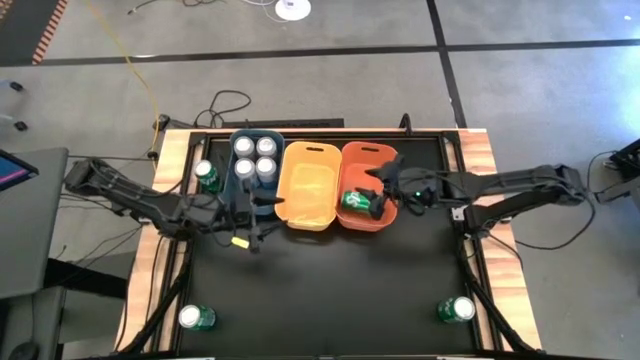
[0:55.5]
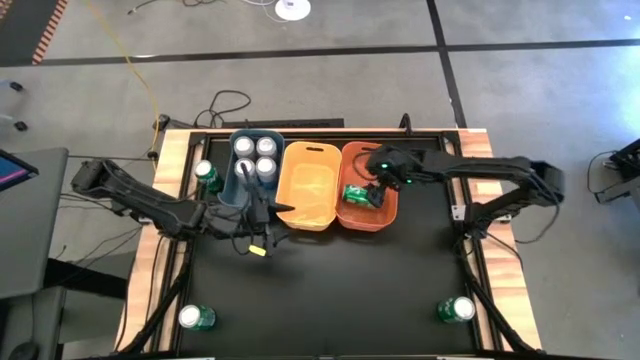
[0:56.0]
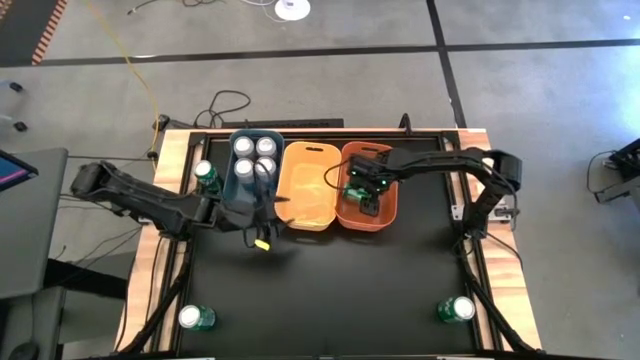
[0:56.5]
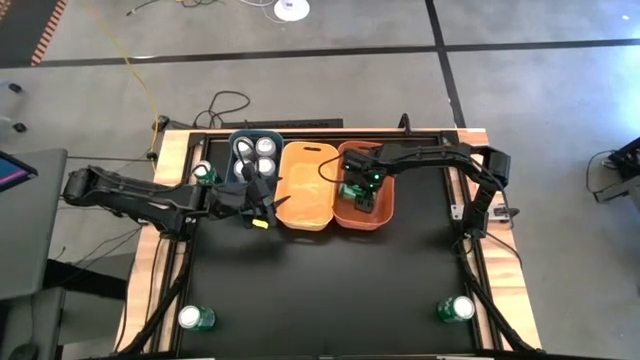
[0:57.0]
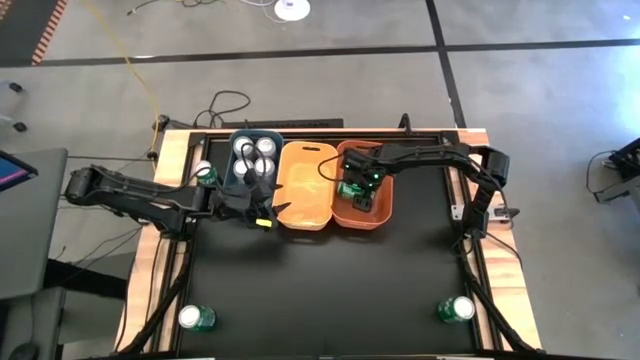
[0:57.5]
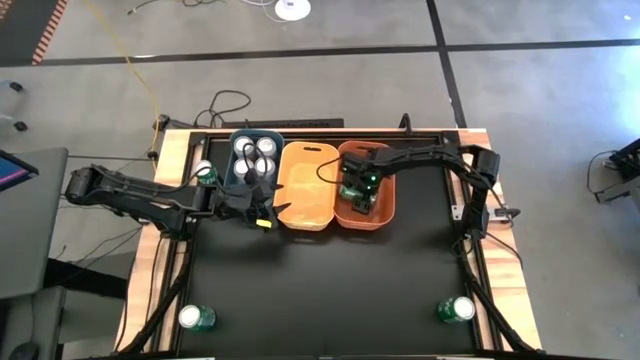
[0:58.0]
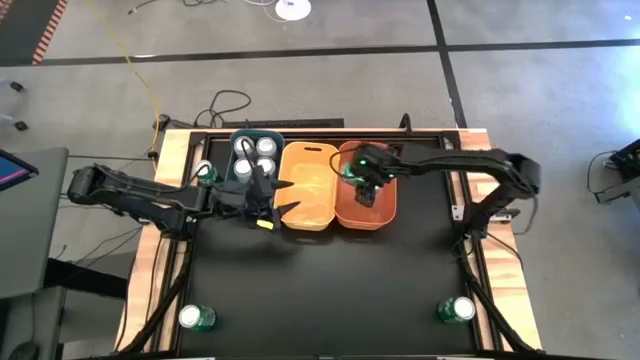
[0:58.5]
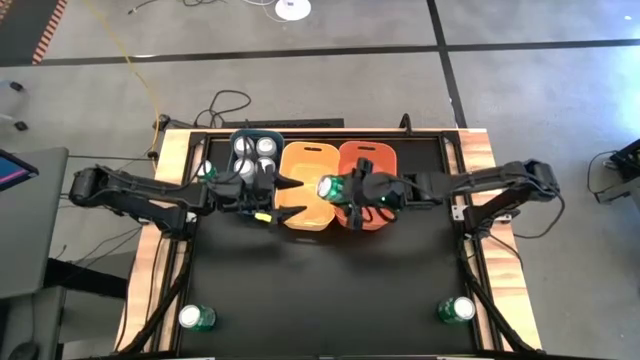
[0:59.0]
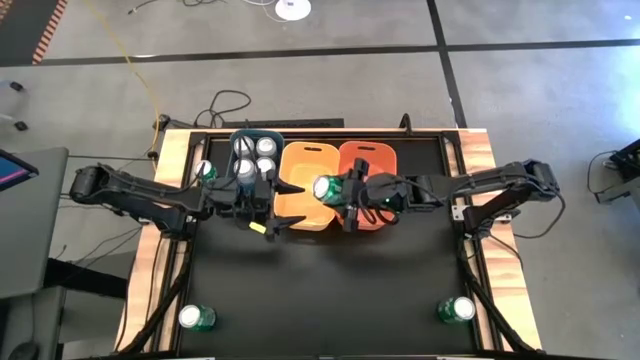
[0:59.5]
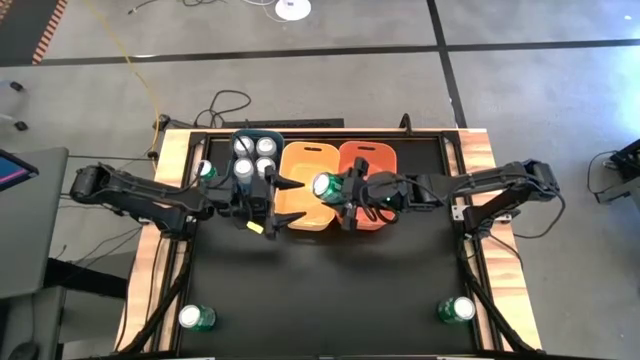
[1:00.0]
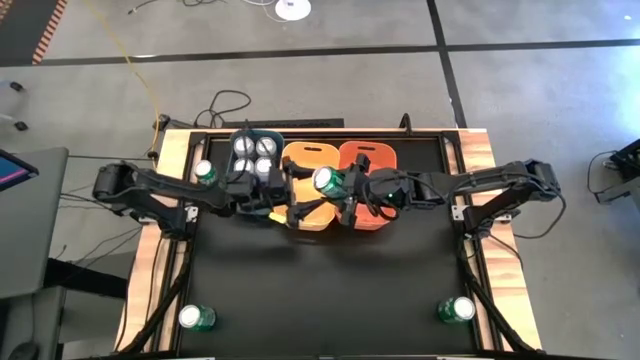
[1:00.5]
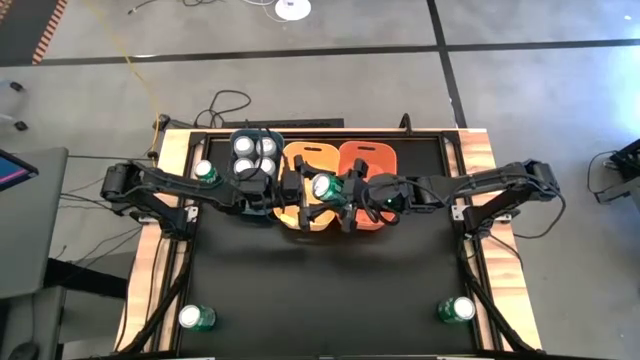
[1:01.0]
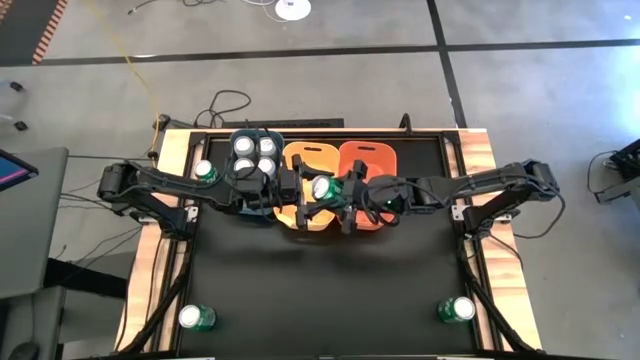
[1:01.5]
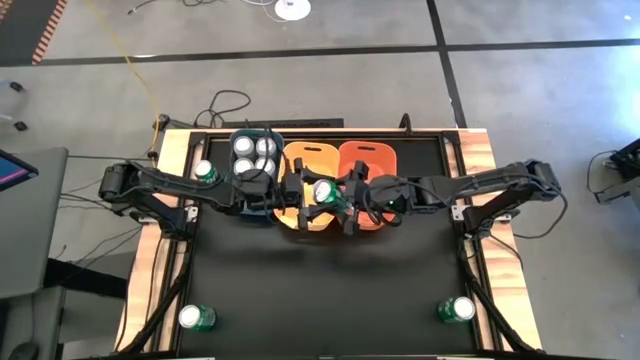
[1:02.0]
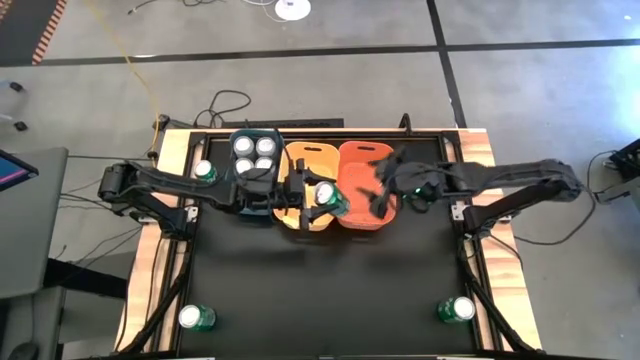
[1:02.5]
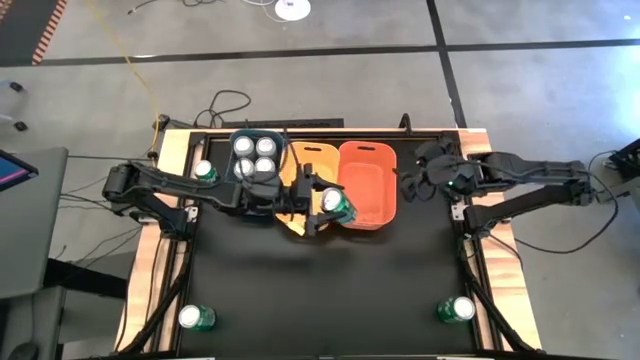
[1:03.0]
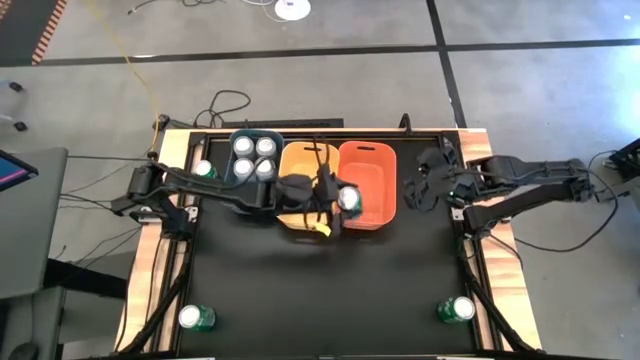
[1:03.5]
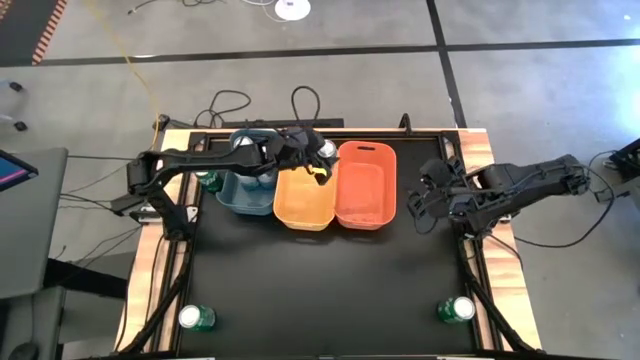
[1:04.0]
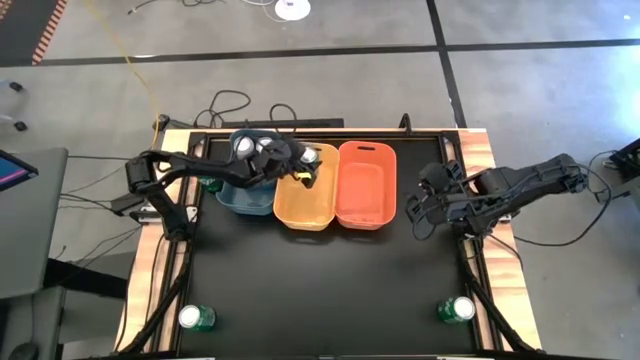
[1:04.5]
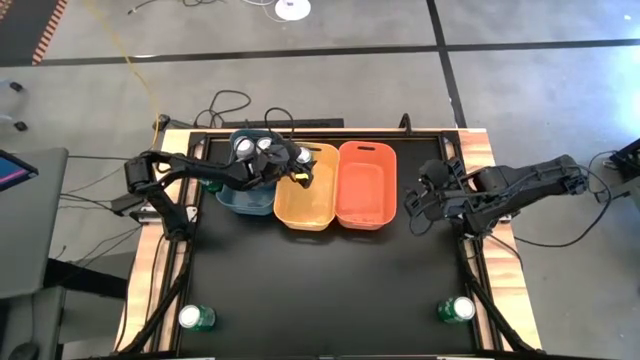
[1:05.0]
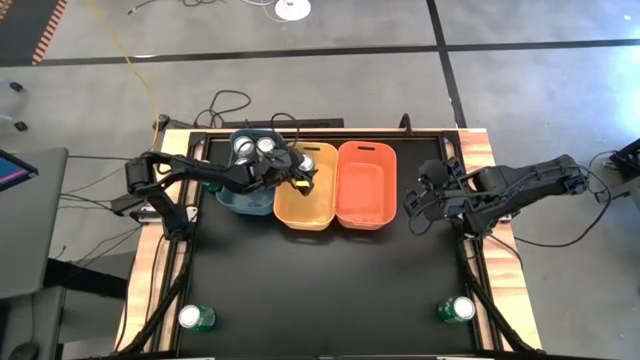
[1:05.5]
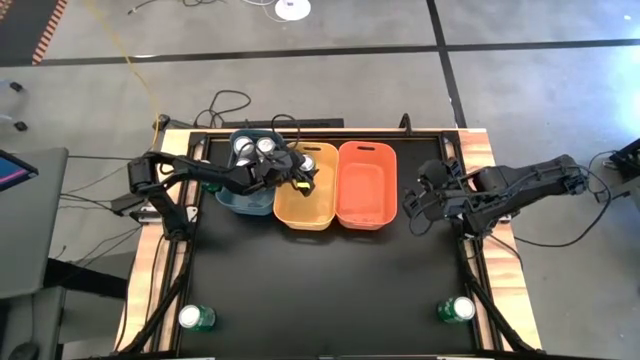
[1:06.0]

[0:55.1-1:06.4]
Task: Sort soda cans
Put the green soda can into the yellow bin

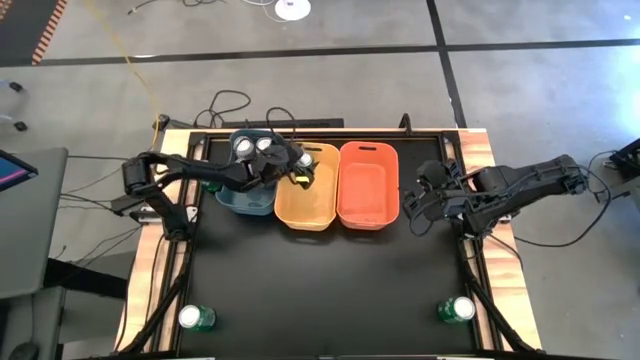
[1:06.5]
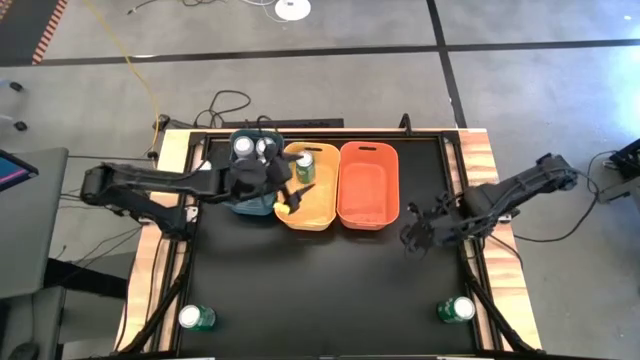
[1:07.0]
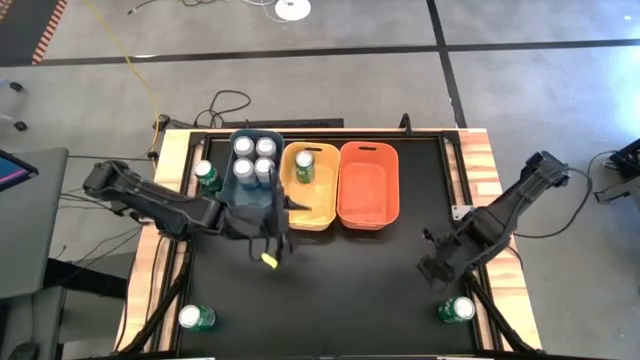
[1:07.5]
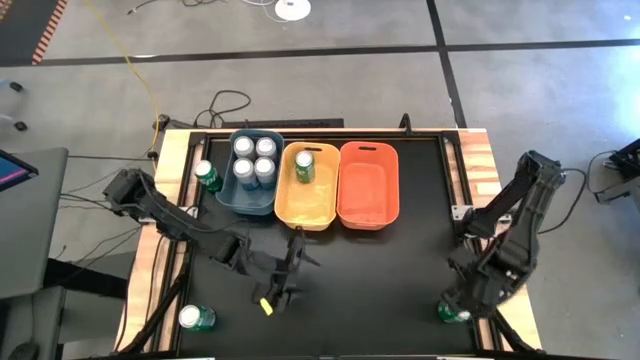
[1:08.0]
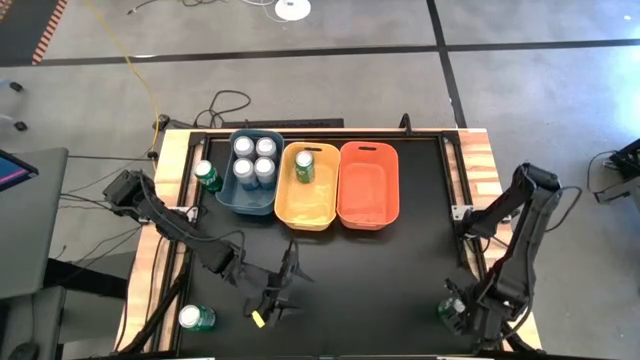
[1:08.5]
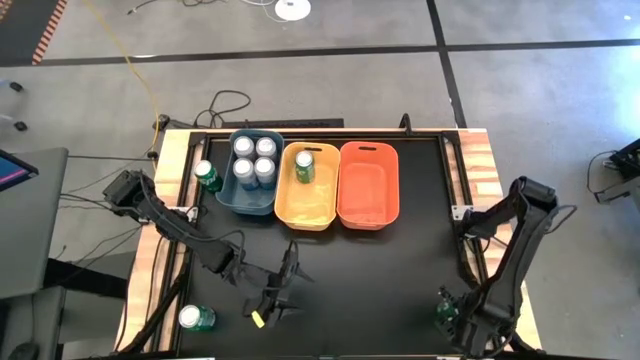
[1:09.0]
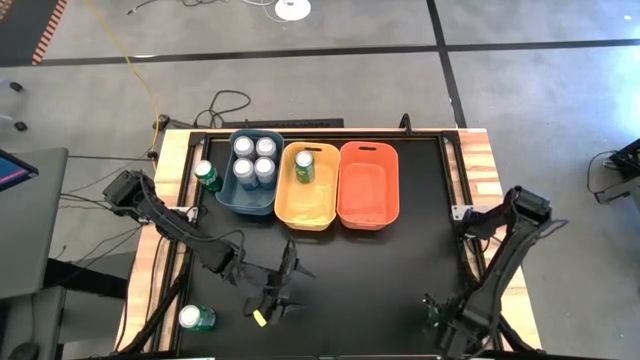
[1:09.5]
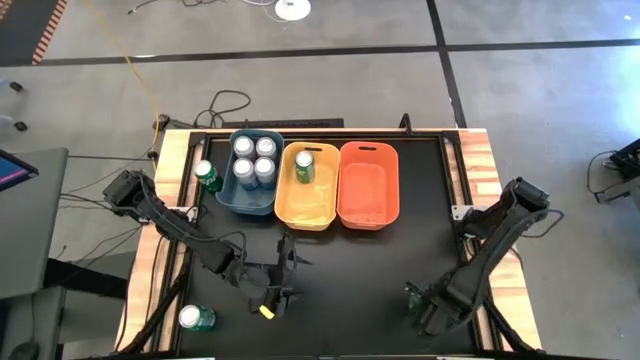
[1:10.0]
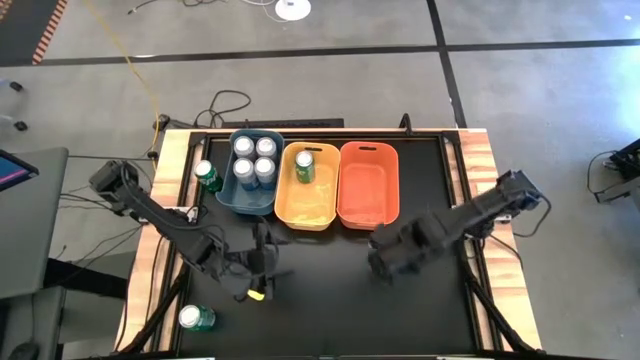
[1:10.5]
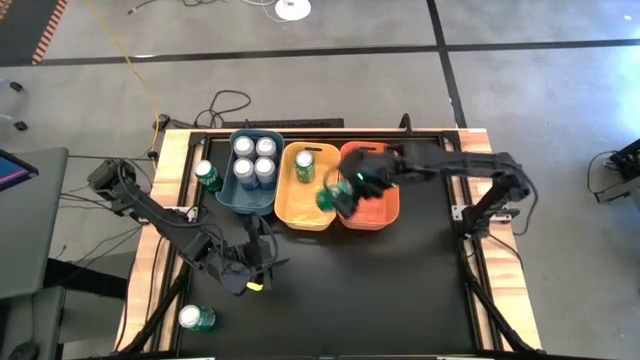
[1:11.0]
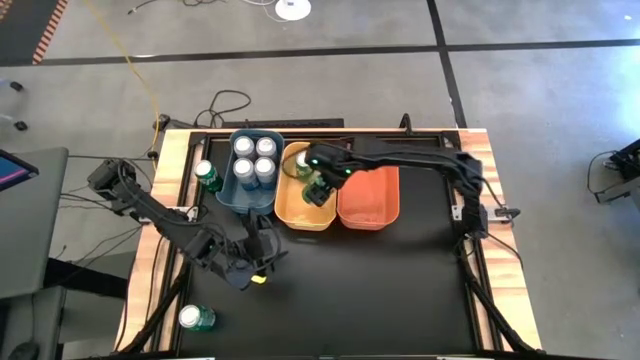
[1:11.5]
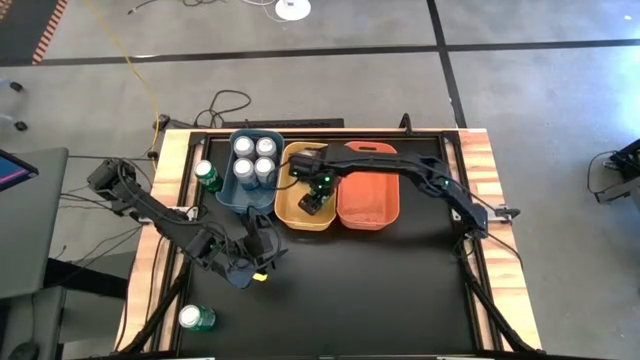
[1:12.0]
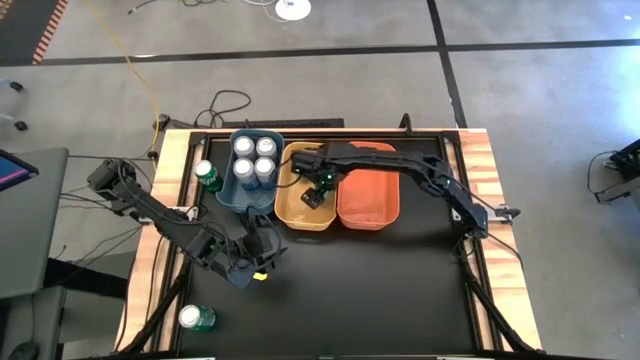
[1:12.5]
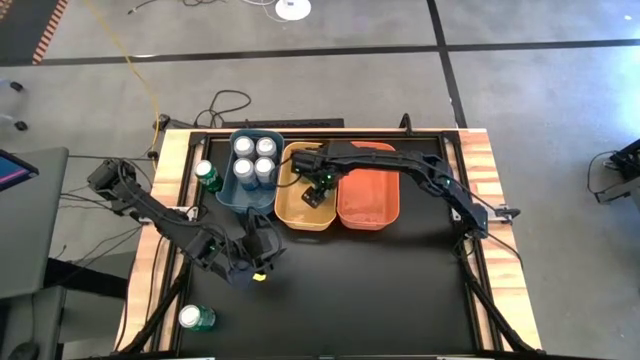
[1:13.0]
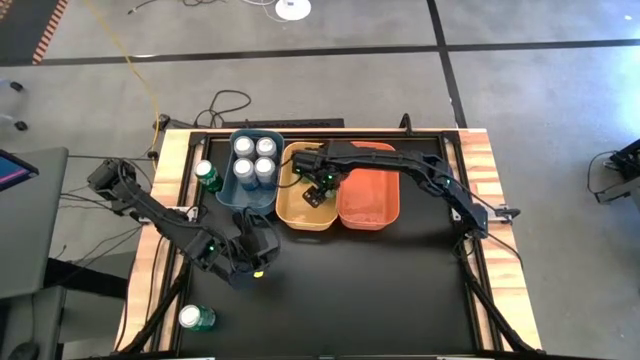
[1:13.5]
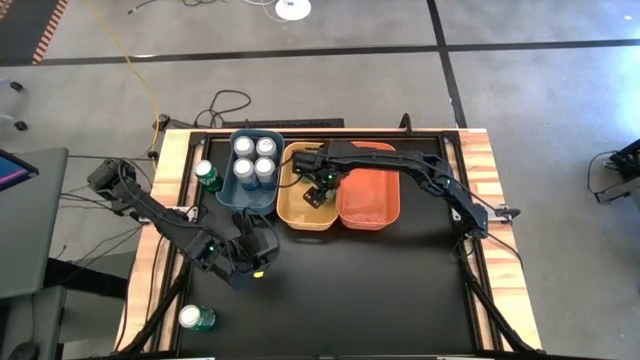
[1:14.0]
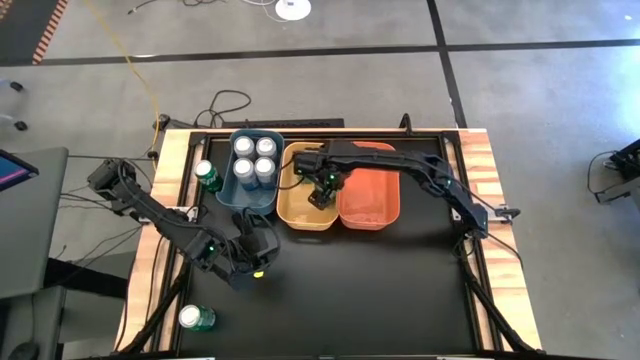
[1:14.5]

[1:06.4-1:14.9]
Put the green soda can into the yellow bin

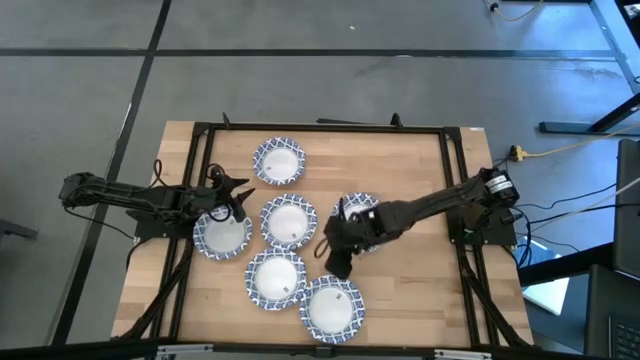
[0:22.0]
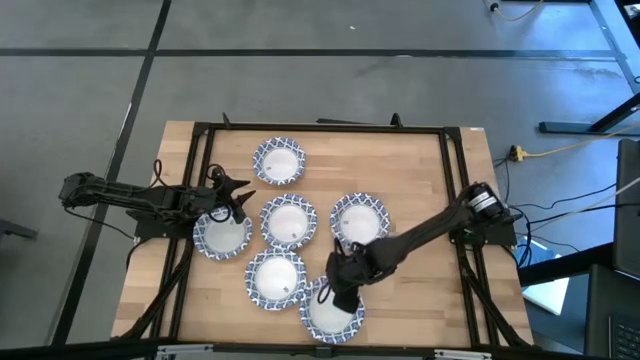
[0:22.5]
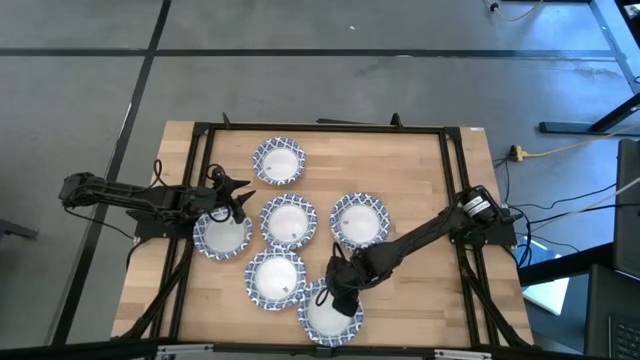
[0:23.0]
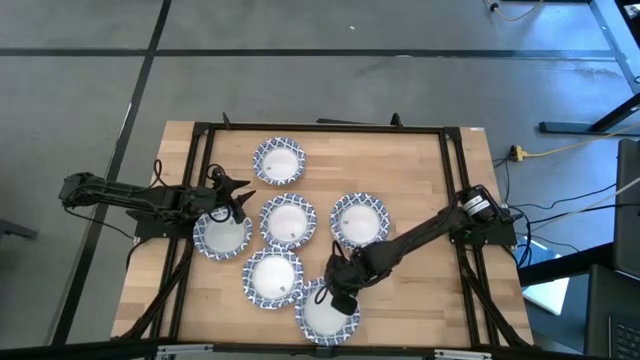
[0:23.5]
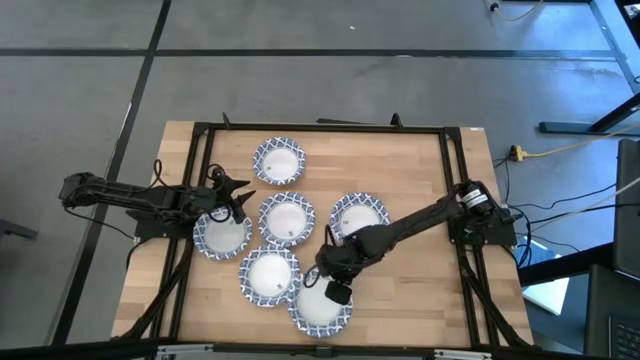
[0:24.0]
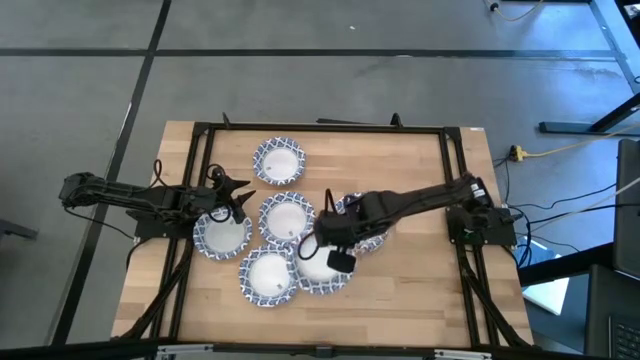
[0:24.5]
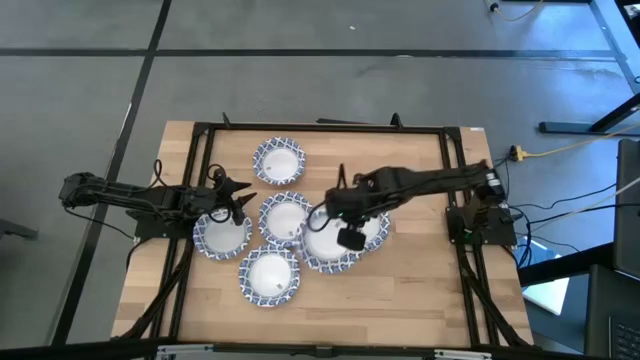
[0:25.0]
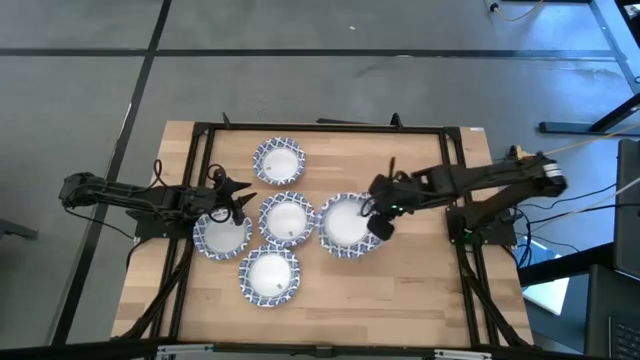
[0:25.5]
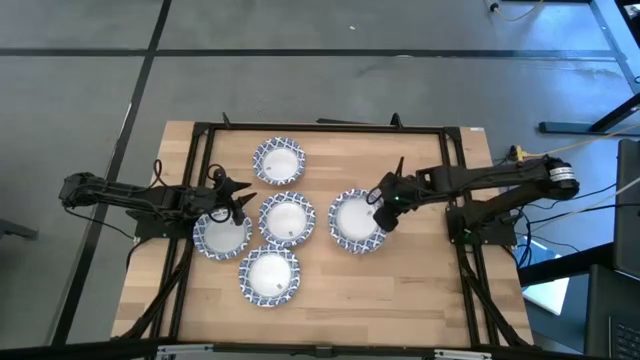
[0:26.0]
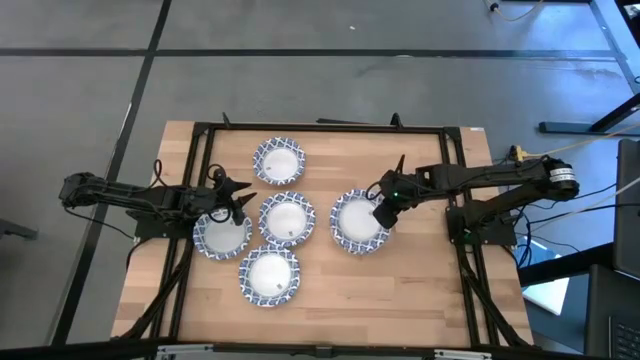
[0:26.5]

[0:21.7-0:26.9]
Task: Nest bowls inside each other
Stack the white patterned bowls on top of the other white patterned bowls
